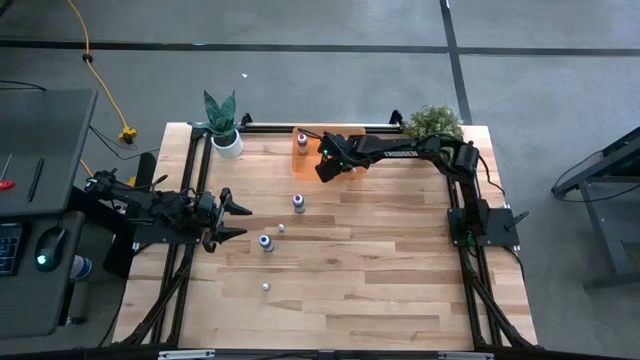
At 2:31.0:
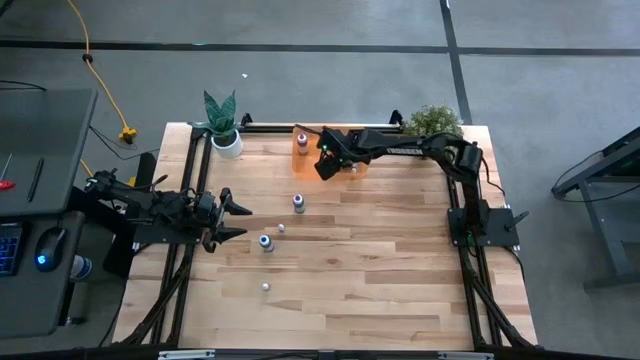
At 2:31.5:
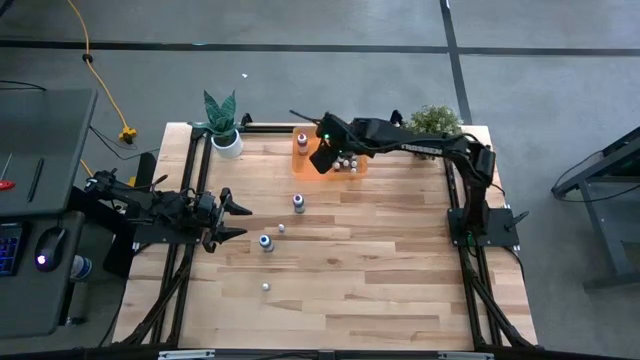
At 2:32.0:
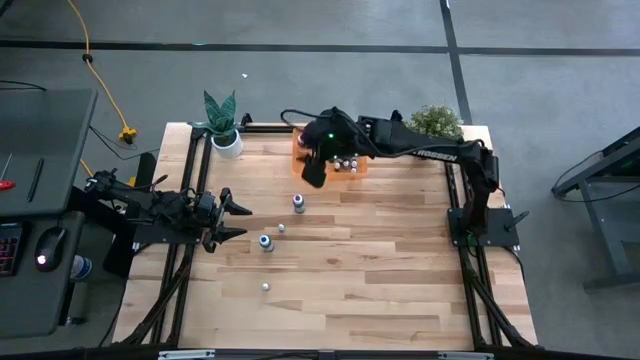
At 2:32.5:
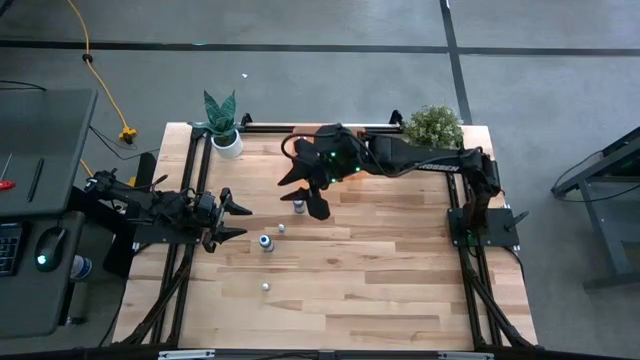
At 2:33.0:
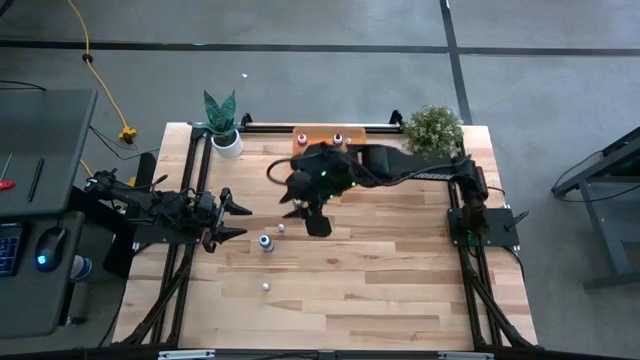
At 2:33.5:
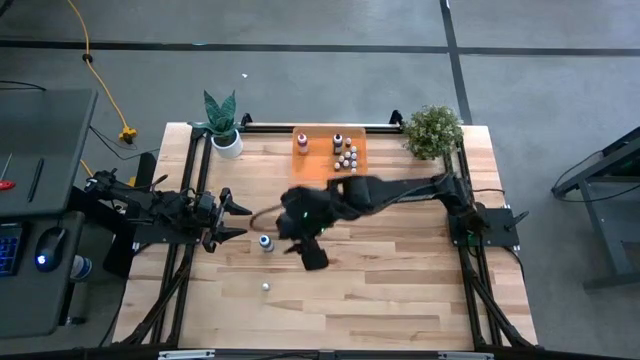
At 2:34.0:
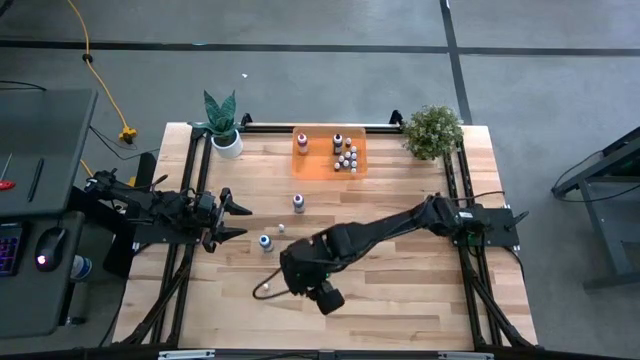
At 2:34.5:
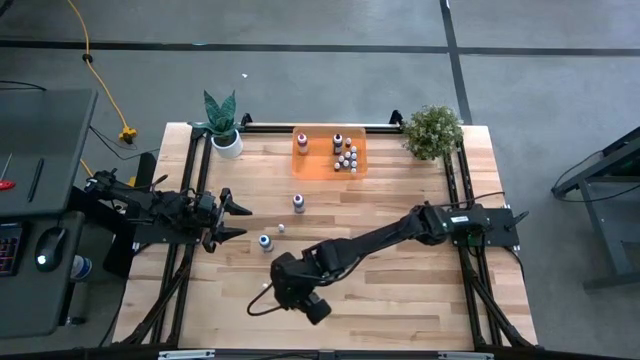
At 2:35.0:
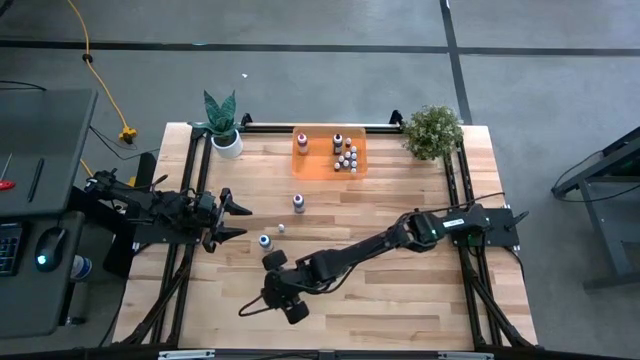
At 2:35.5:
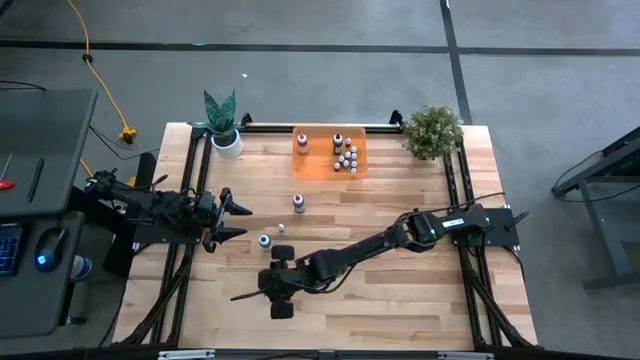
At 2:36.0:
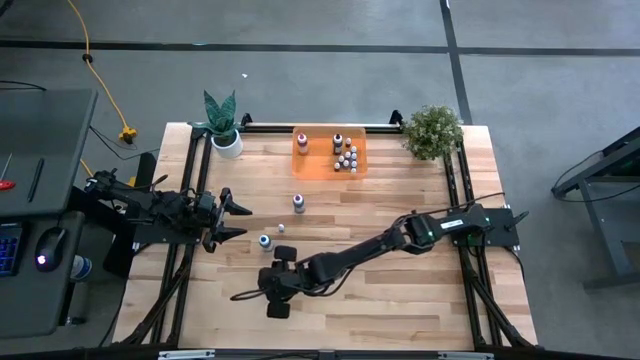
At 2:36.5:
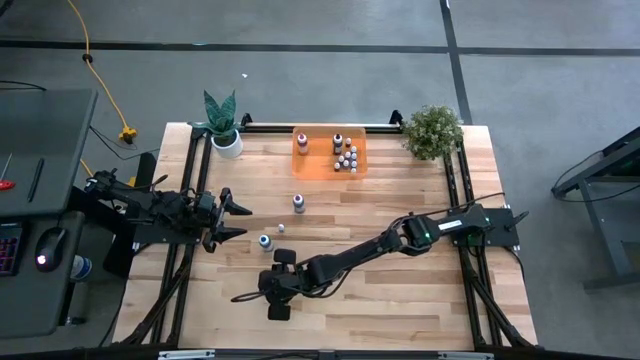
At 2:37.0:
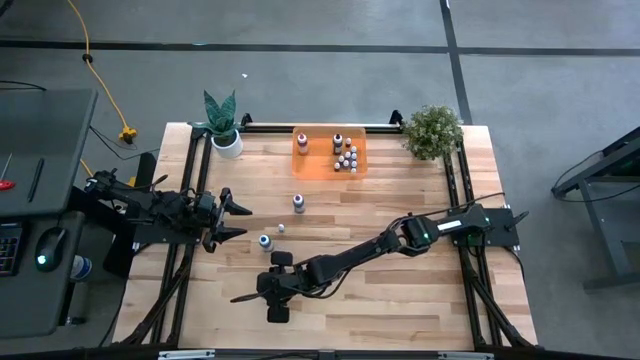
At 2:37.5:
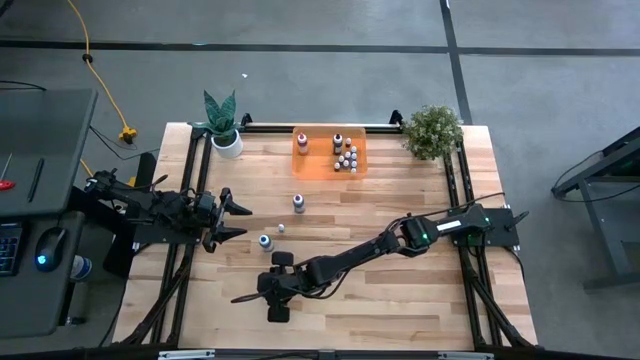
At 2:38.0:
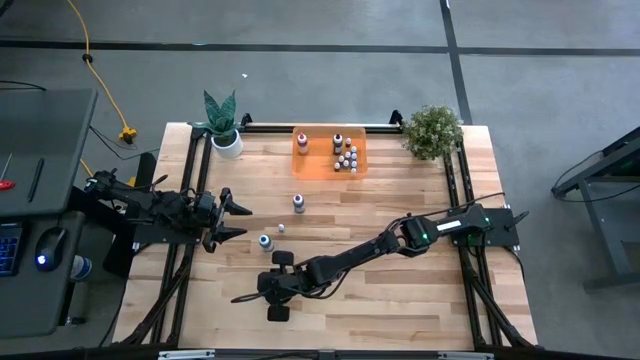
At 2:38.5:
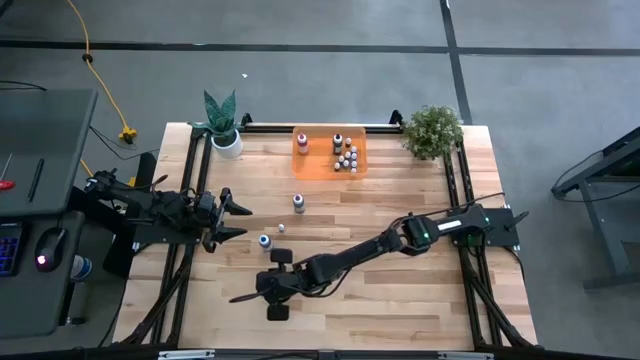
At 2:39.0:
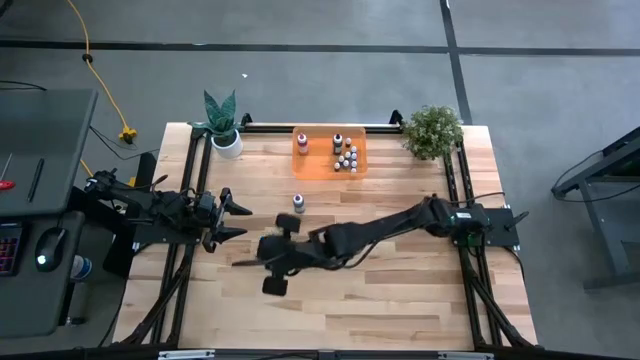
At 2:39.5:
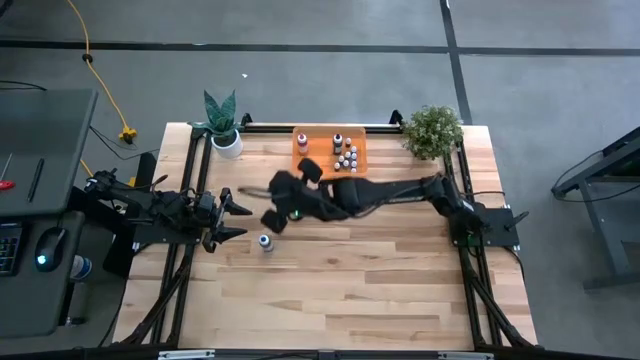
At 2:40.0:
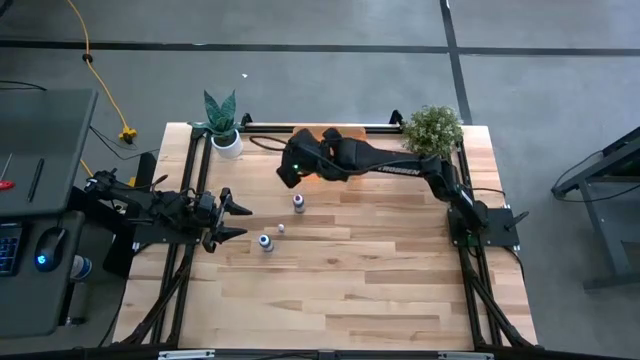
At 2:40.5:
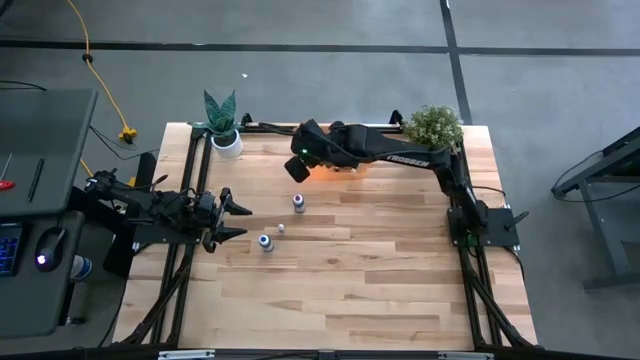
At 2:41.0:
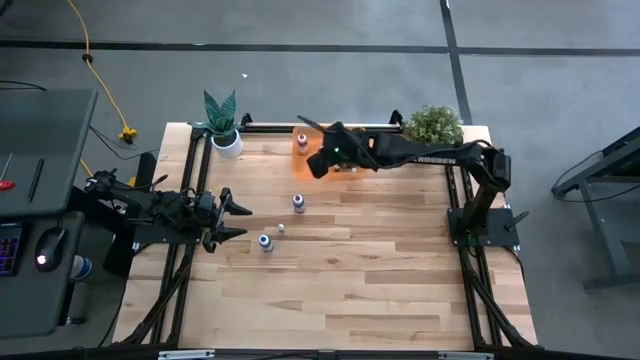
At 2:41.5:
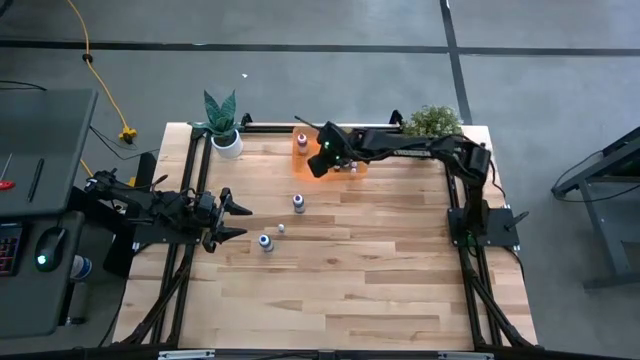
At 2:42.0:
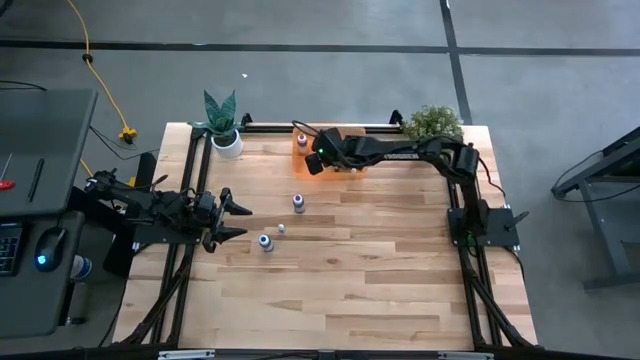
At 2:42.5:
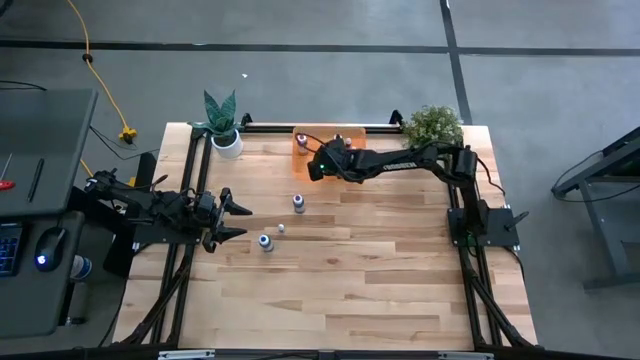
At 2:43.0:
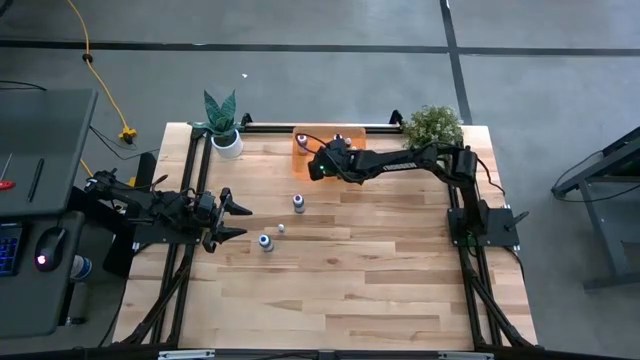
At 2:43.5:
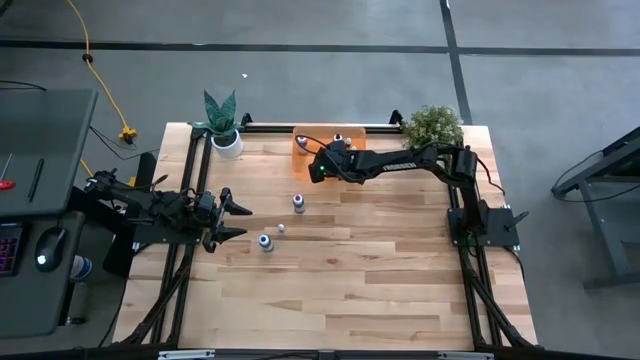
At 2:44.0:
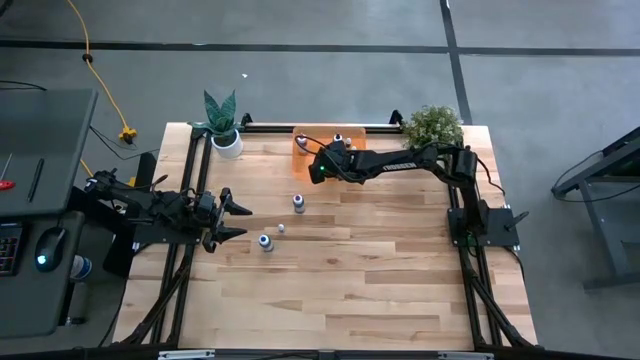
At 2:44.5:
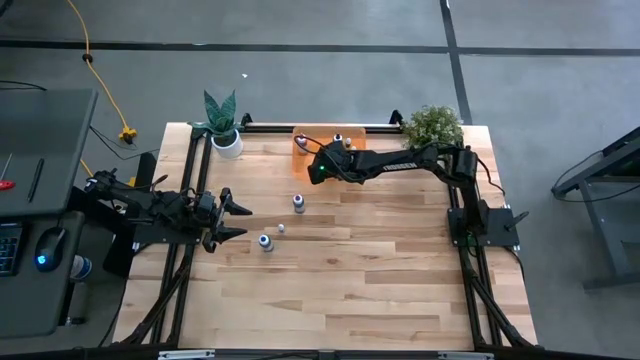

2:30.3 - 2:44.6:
Task: Pick & Place food coloring
Put the small black food coloring bottle into the orange bin

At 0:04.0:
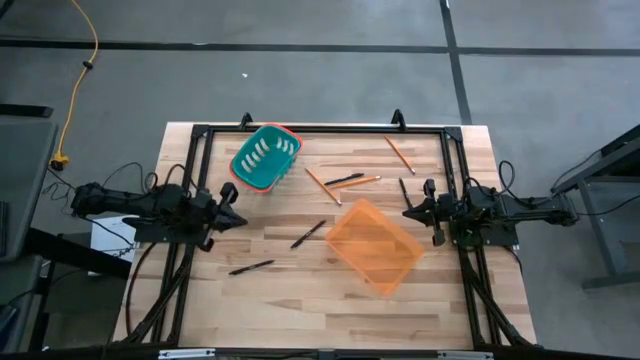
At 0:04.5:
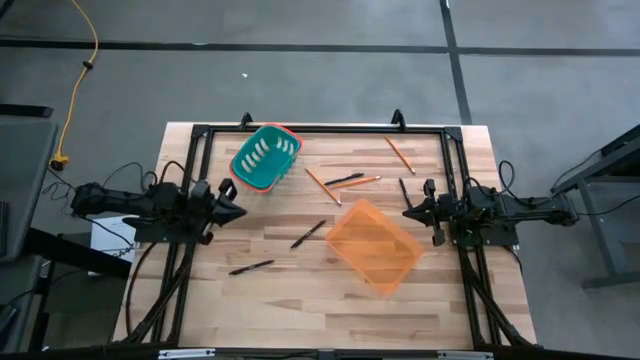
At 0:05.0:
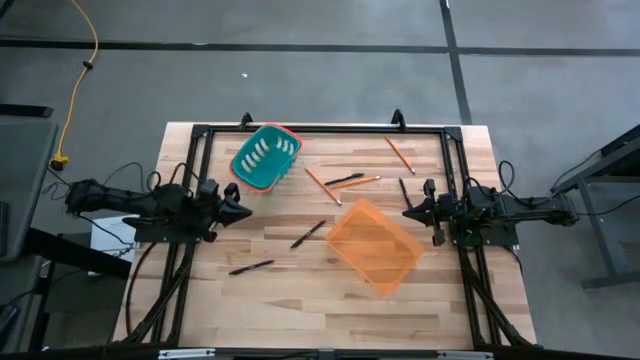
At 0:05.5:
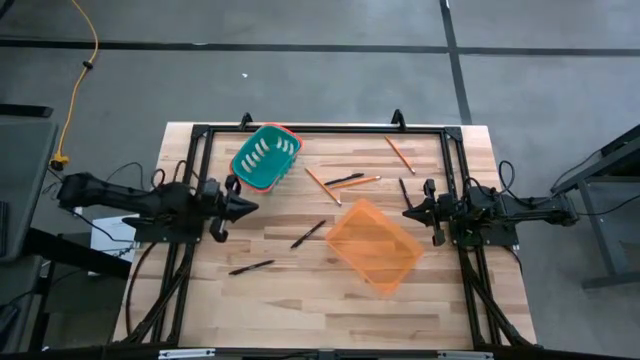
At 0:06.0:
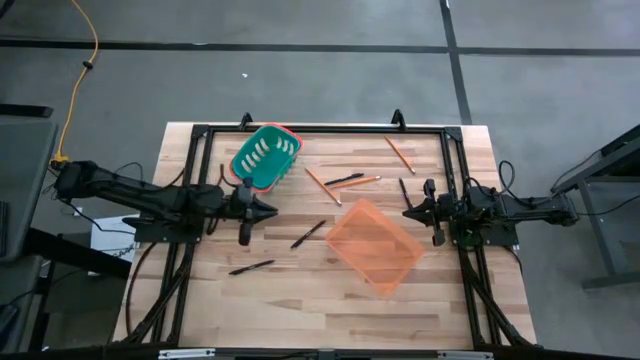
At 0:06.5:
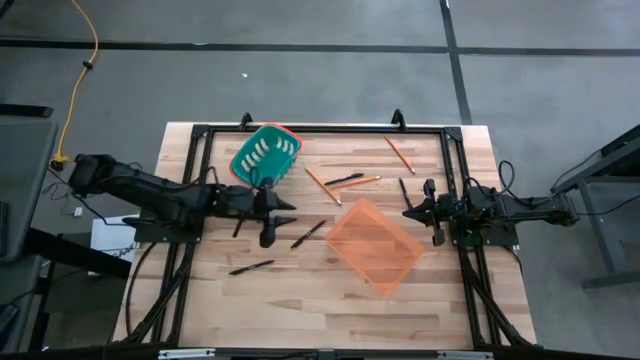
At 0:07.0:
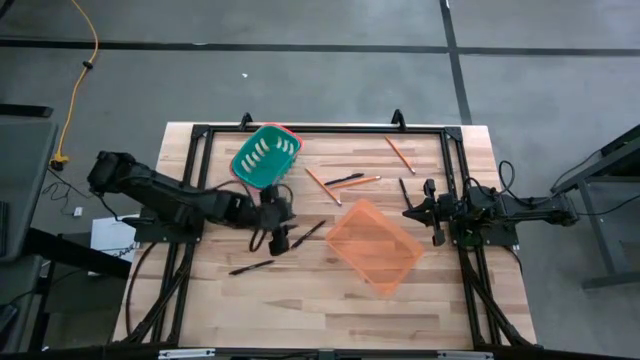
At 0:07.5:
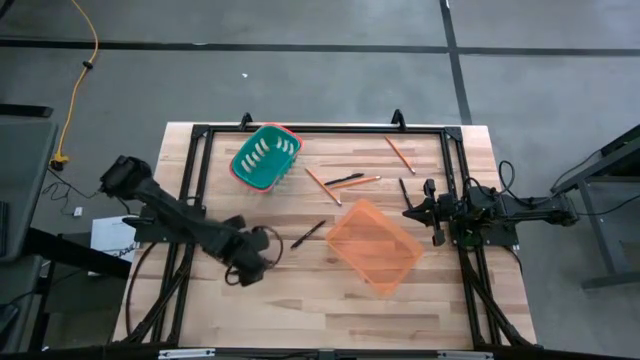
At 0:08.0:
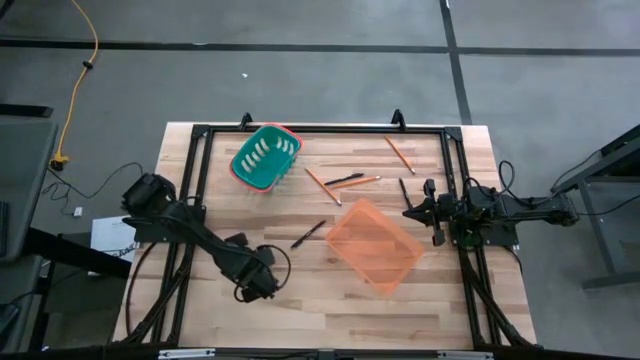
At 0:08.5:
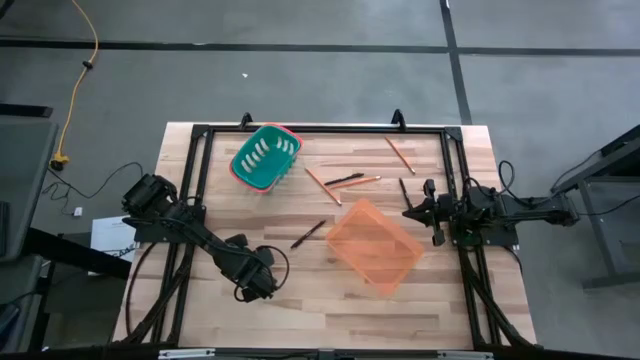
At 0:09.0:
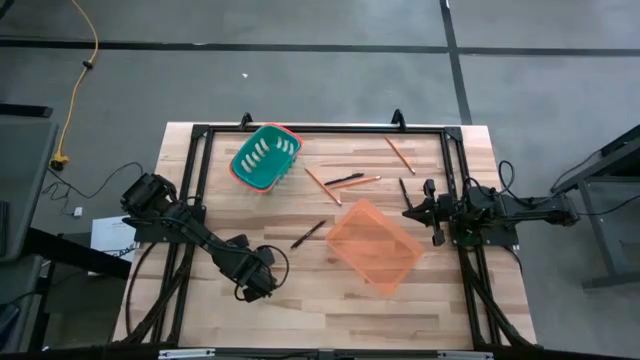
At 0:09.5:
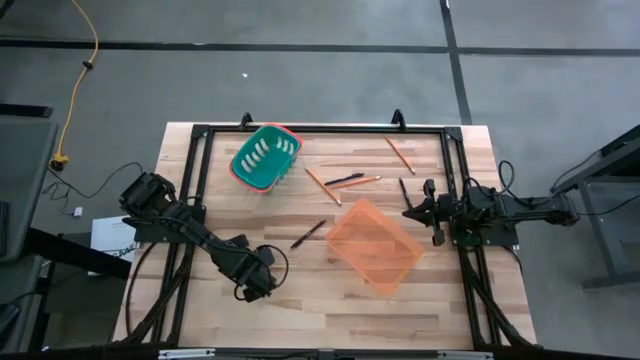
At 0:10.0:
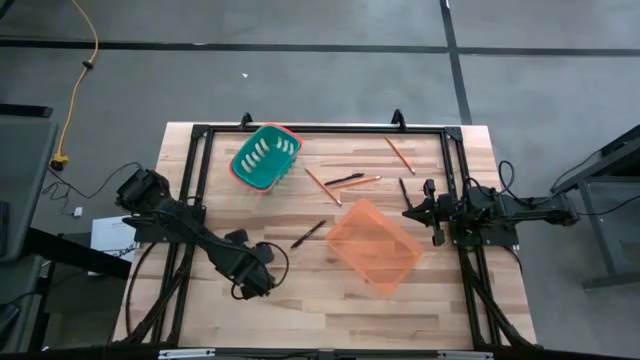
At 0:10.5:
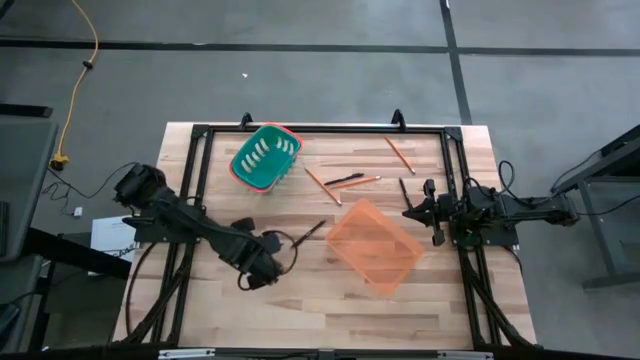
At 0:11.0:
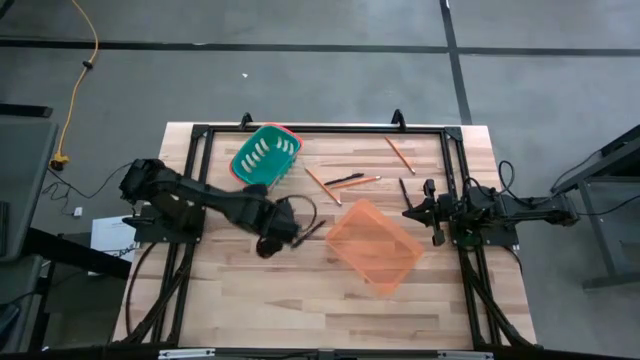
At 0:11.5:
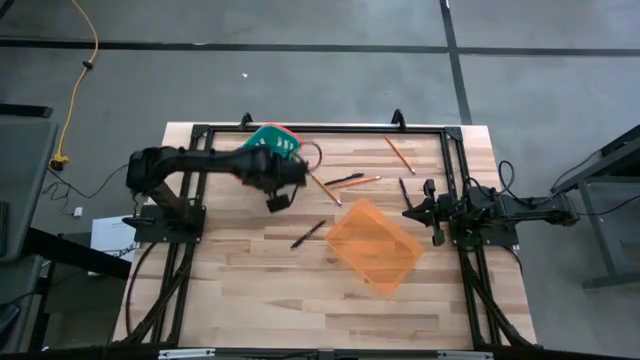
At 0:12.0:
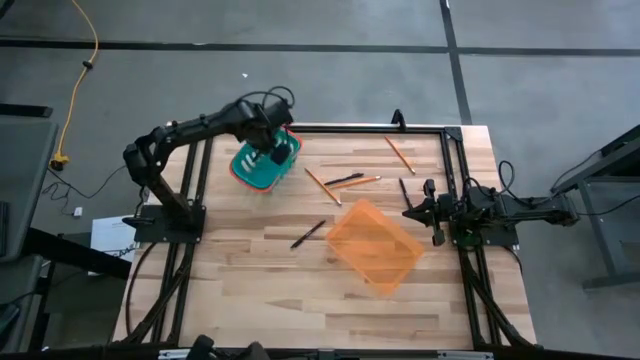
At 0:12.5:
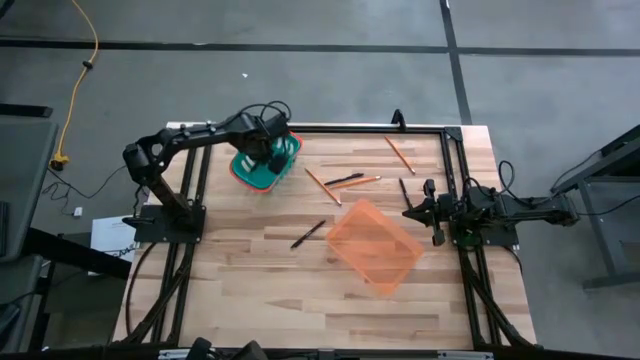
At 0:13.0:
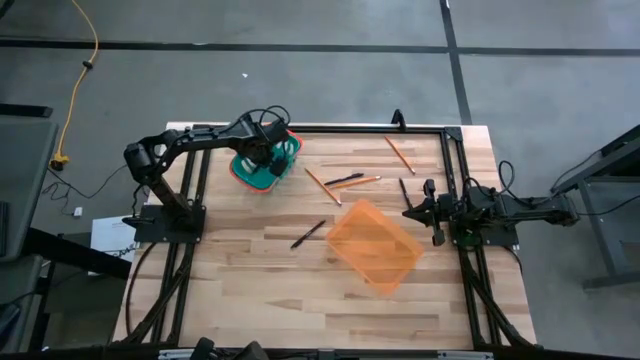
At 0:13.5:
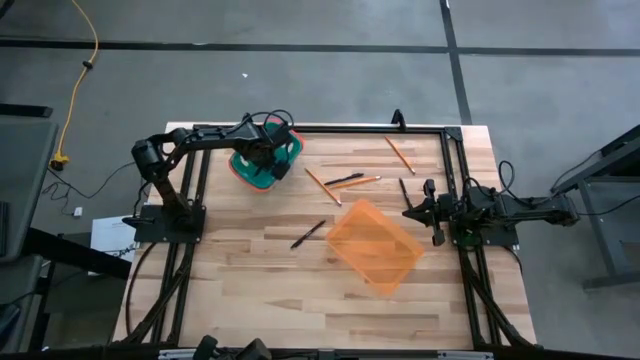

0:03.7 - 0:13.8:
Task: Sort pens & pencils
Put the black pen into the blue bin
